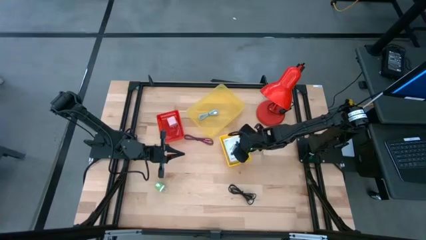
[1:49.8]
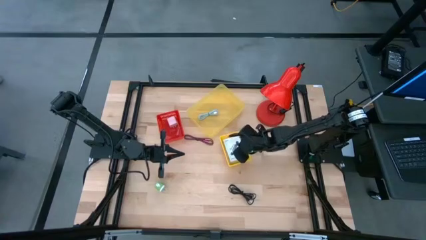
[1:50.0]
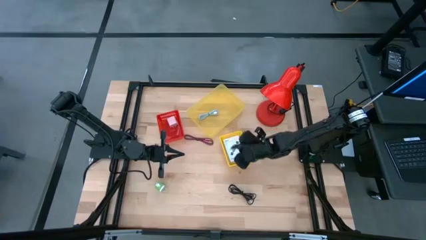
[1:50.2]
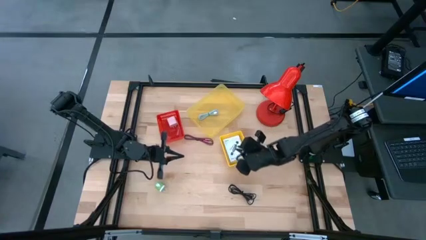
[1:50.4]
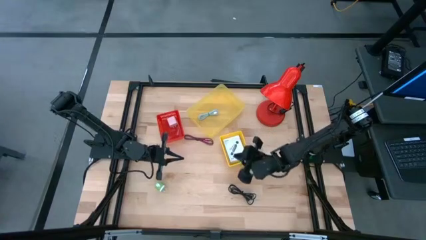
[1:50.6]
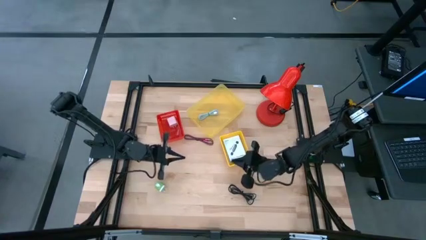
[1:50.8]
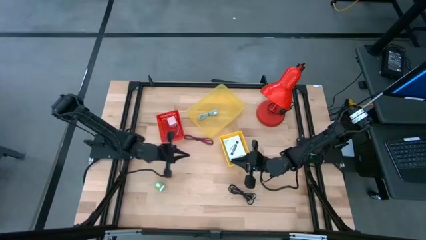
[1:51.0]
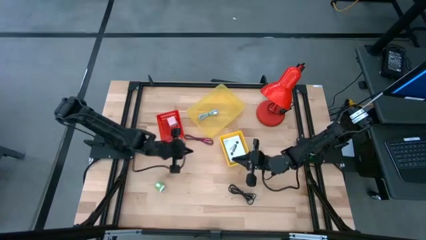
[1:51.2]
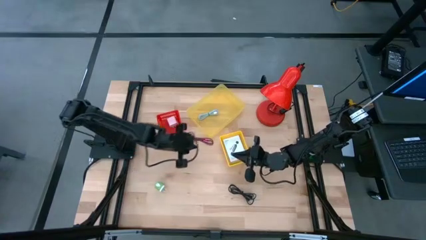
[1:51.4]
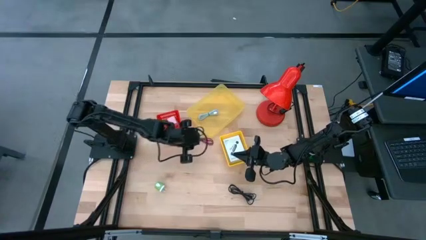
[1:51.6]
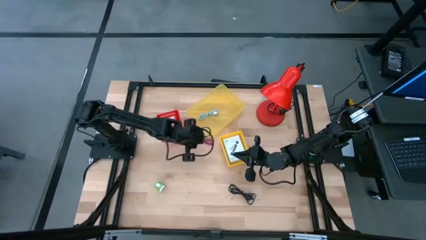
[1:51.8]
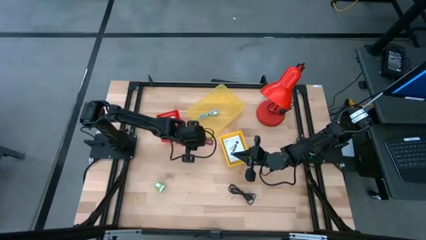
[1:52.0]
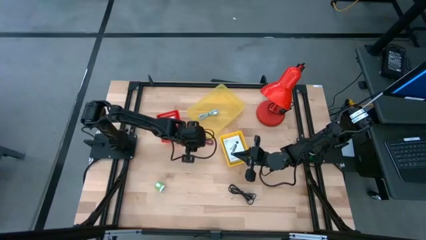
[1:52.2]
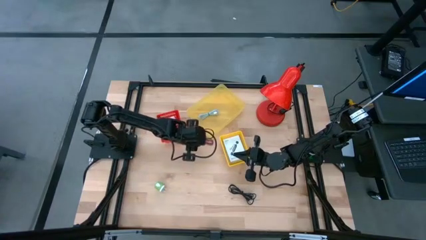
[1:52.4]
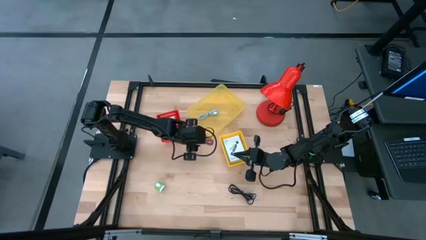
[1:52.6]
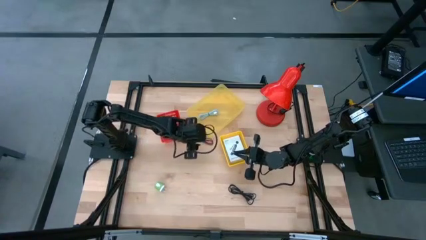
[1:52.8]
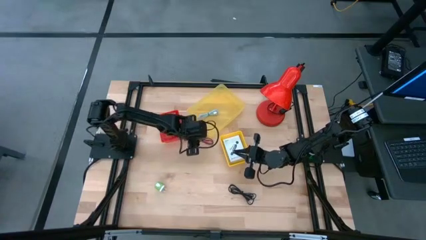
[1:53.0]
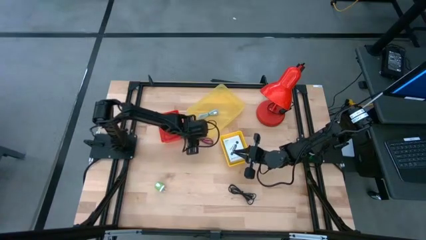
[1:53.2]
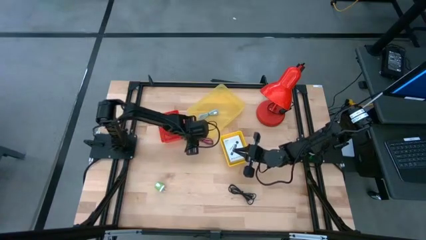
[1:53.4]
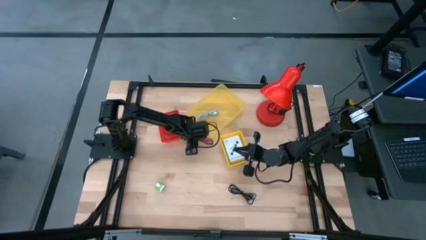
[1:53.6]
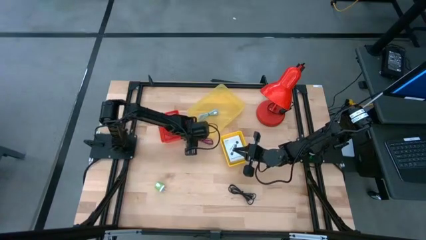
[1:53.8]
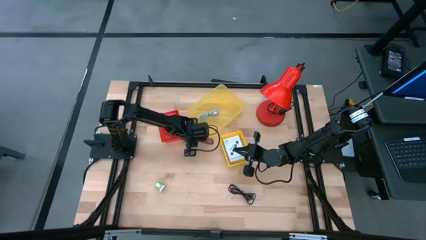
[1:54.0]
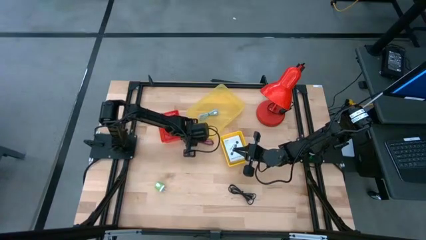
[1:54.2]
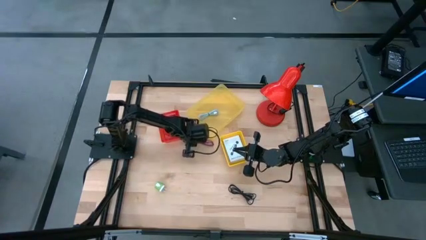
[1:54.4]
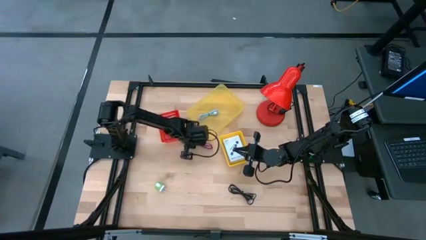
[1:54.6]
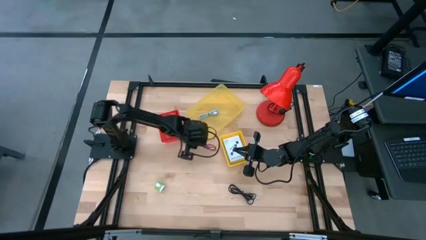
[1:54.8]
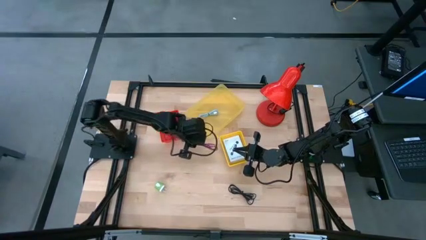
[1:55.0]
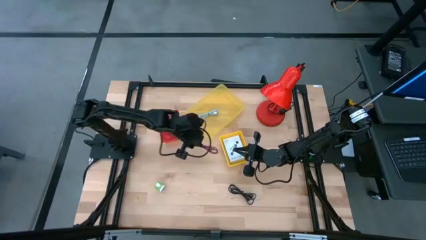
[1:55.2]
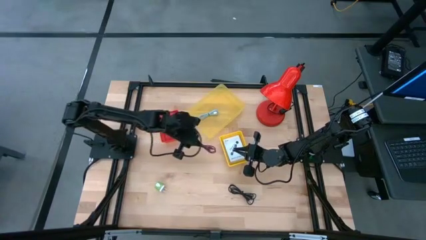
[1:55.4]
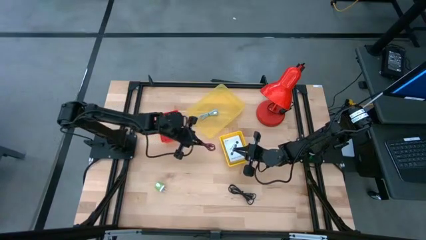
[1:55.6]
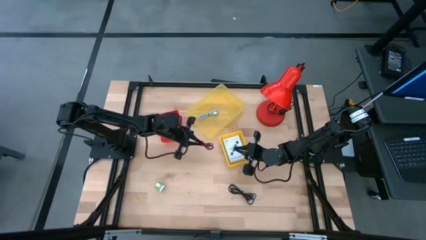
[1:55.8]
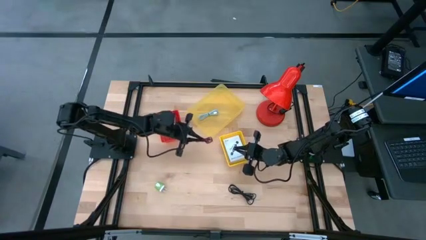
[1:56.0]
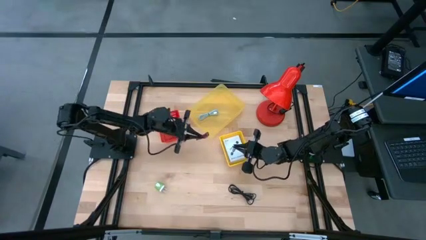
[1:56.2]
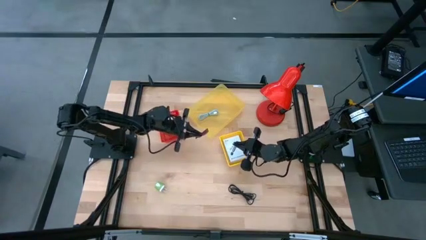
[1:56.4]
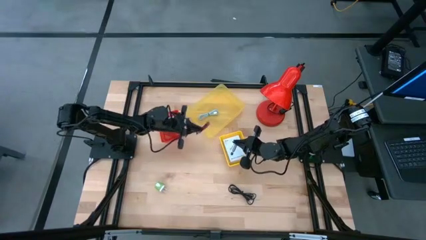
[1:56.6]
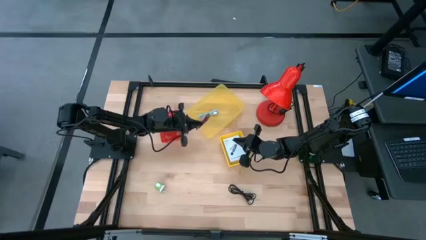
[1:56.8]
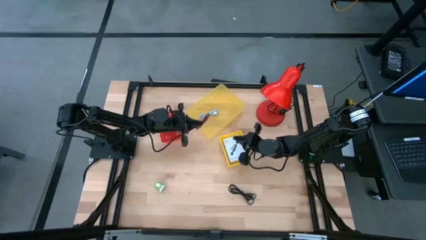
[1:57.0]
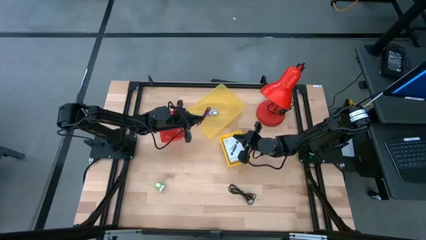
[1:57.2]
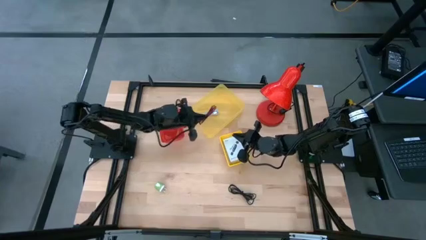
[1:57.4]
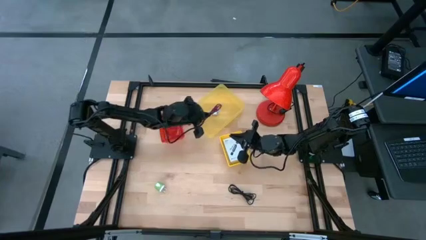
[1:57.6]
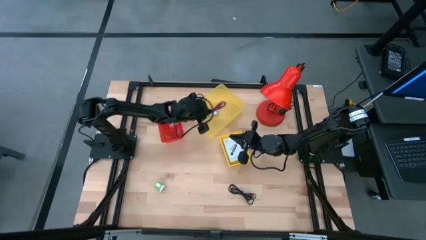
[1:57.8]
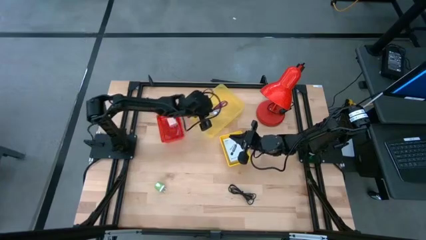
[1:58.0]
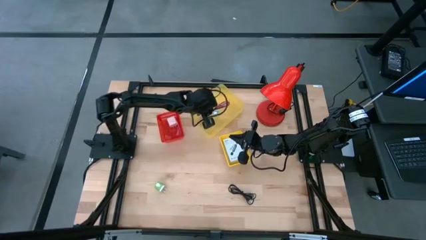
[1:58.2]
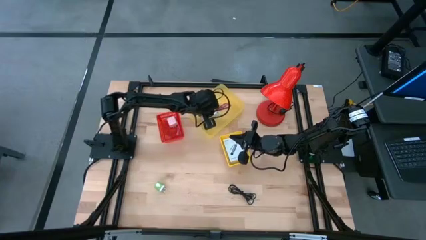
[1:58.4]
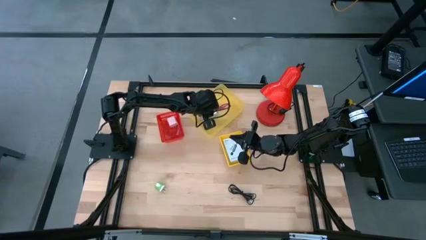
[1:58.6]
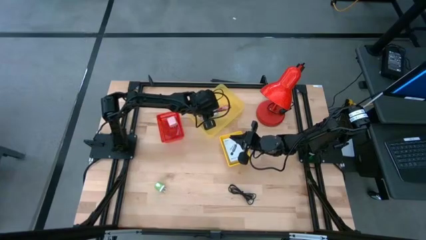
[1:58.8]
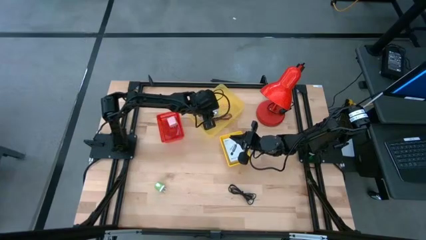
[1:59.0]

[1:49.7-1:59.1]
Task: Pick and place items into bin
Put the red charger cable into the big yellow bin

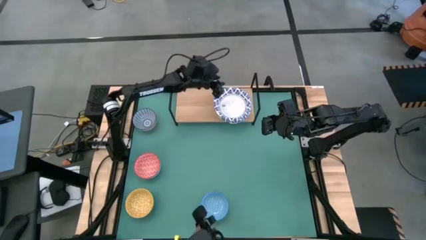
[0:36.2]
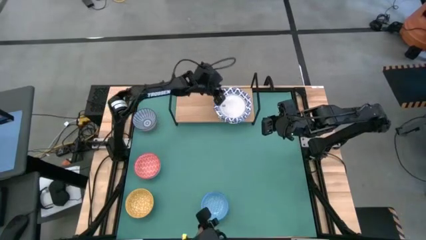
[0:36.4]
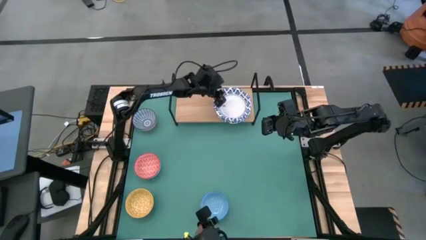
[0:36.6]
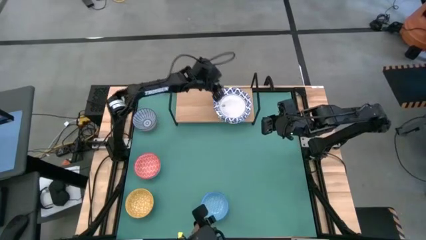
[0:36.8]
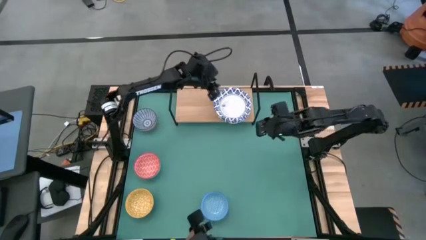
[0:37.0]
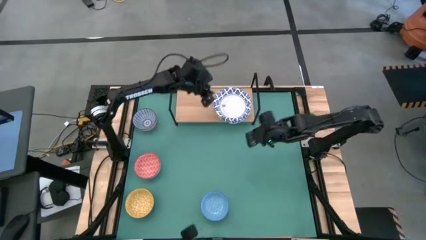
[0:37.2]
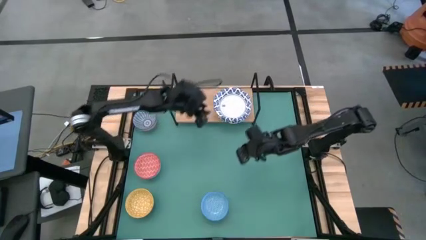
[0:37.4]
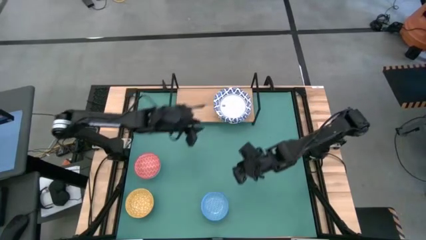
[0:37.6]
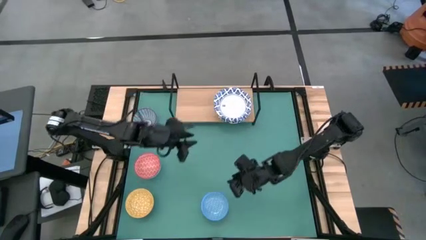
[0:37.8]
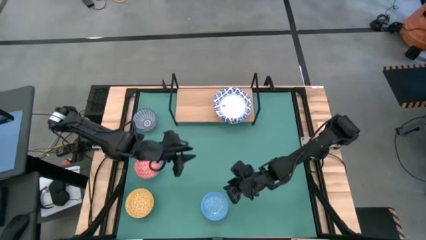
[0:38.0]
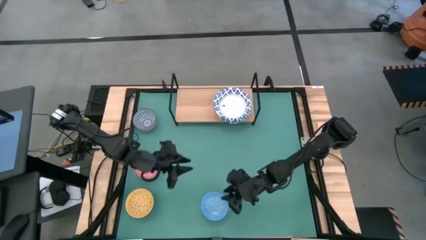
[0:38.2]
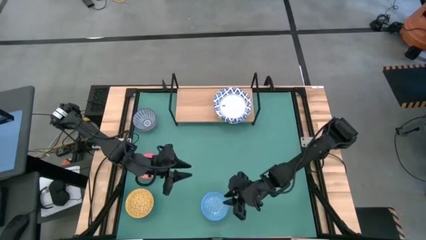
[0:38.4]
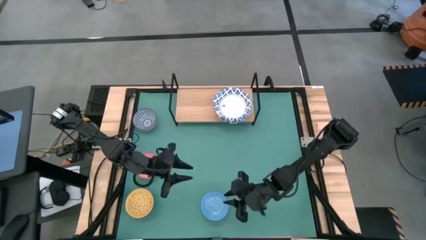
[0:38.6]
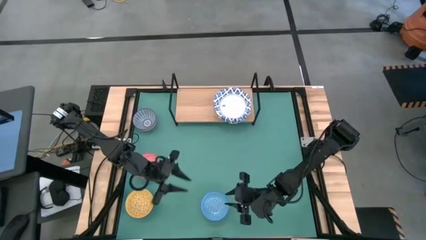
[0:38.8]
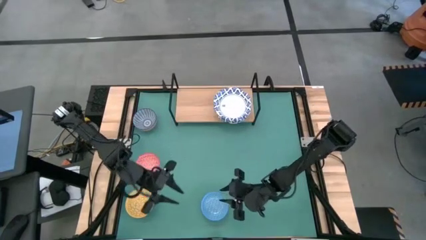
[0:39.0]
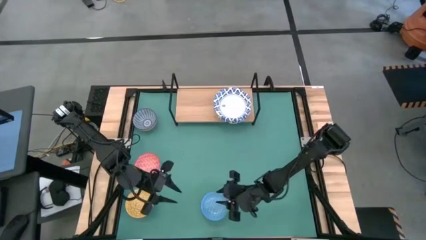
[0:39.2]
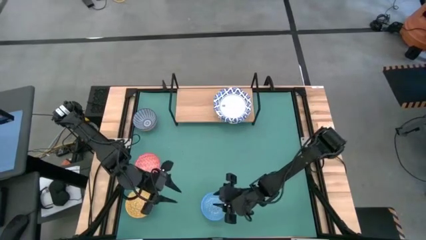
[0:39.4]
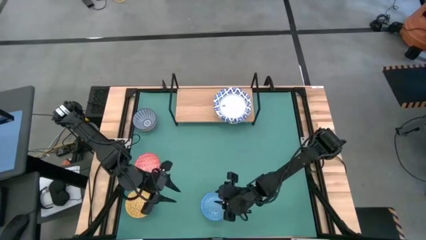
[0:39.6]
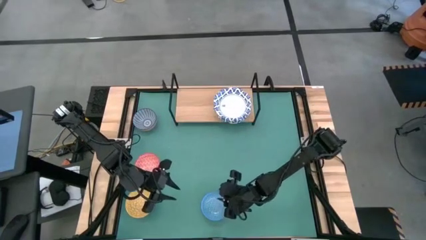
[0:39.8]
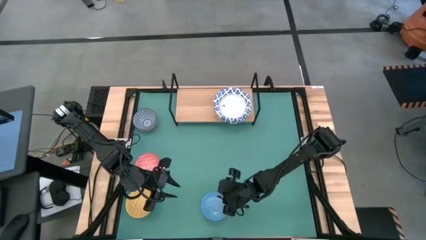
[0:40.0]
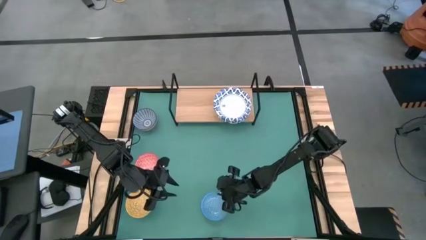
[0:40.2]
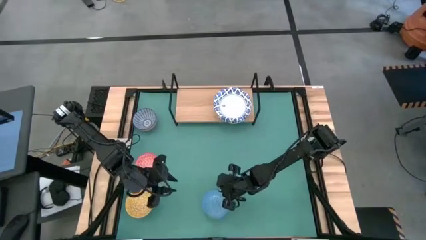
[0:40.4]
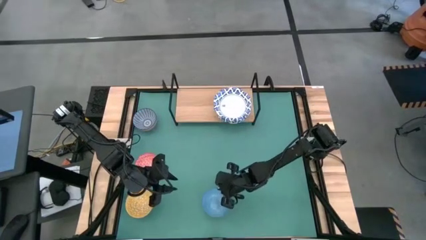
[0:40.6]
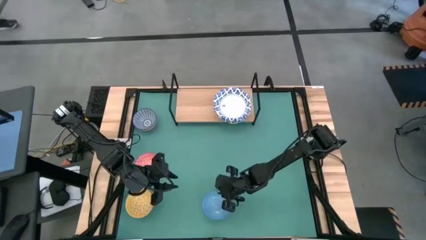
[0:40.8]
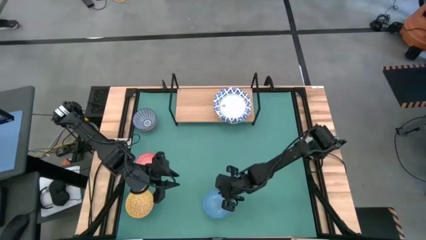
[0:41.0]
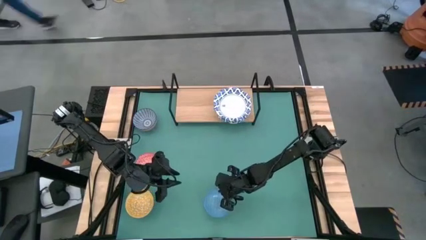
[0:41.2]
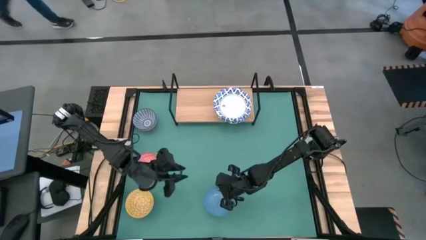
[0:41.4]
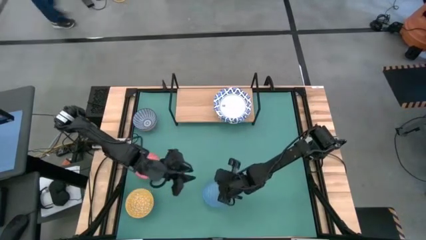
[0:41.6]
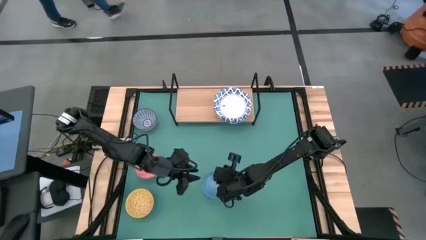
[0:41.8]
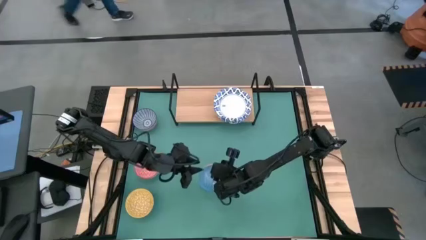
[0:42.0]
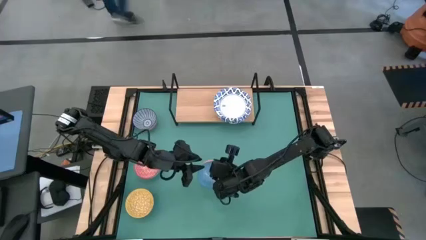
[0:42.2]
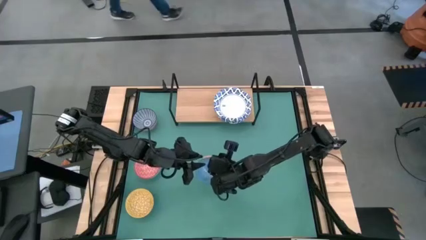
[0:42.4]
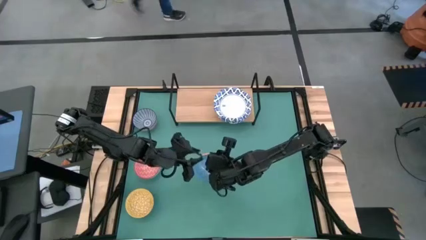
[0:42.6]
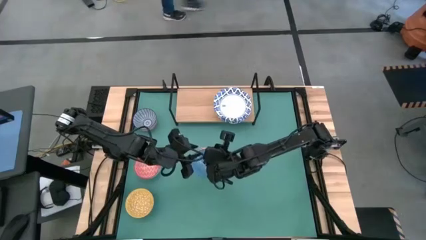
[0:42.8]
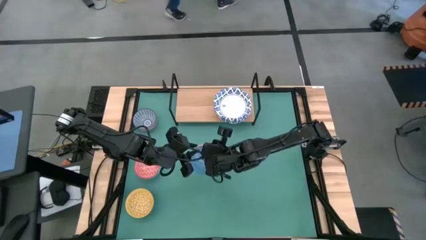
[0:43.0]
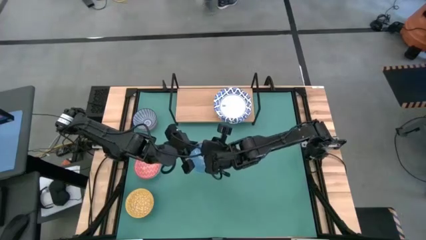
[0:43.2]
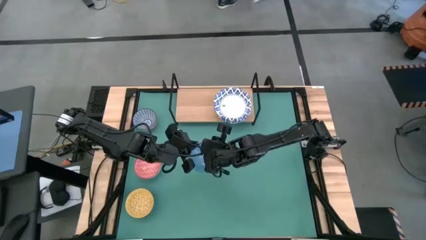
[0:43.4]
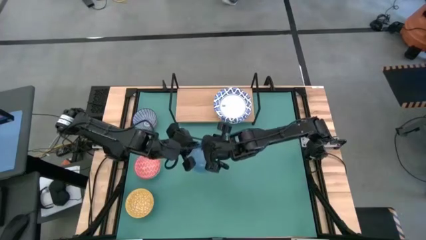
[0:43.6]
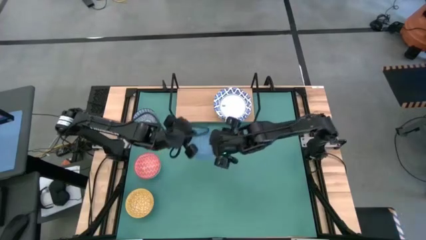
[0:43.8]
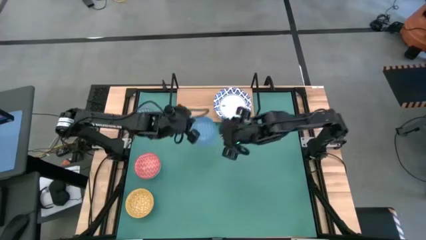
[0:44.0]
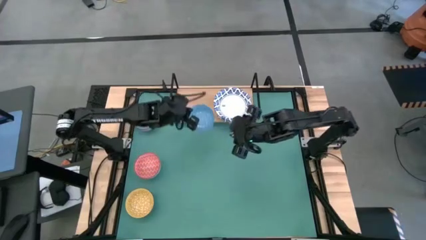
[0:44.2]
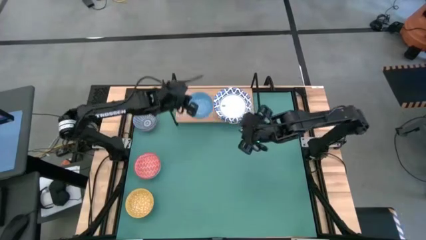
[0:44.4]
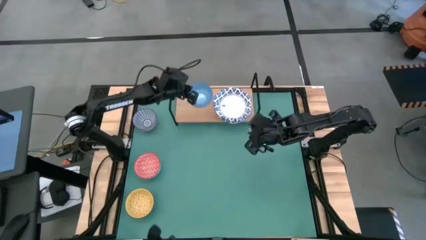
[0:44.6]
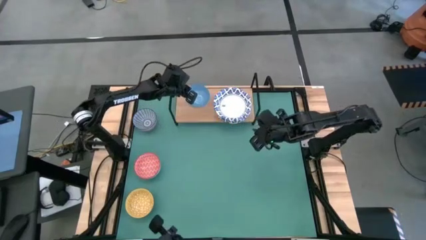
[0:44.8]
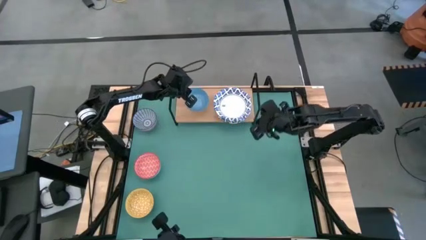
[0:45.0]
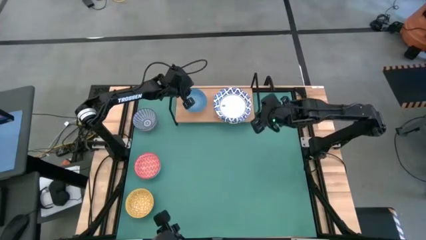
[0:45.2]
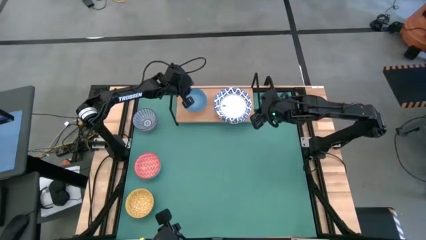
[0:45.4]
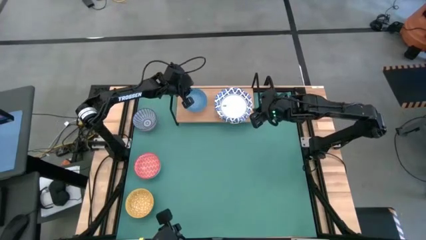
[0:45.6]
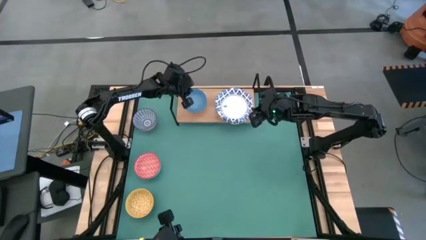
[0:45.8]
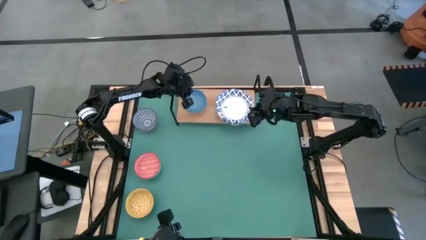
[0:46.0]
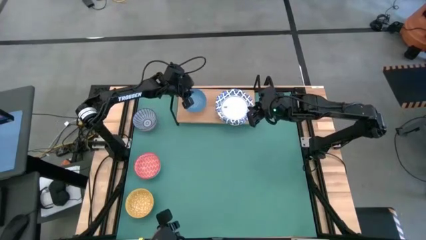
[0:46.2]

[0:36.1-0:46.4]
Task: Place and stack bowls onto a shelf
Put the blue bowl on the shelf
